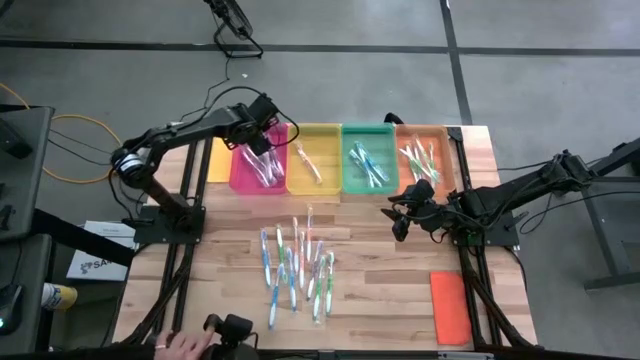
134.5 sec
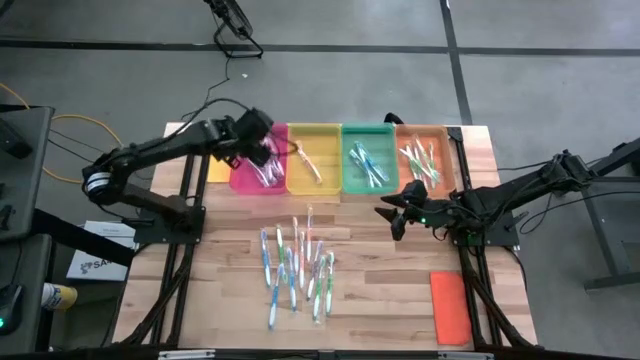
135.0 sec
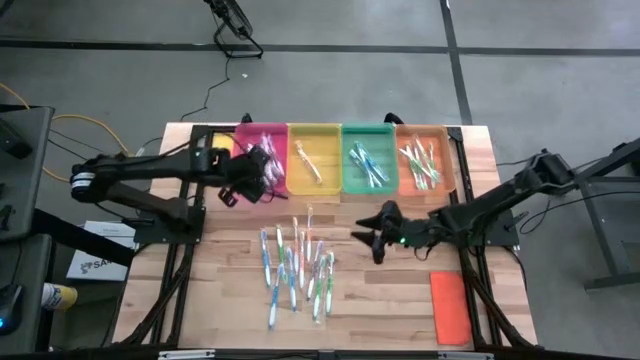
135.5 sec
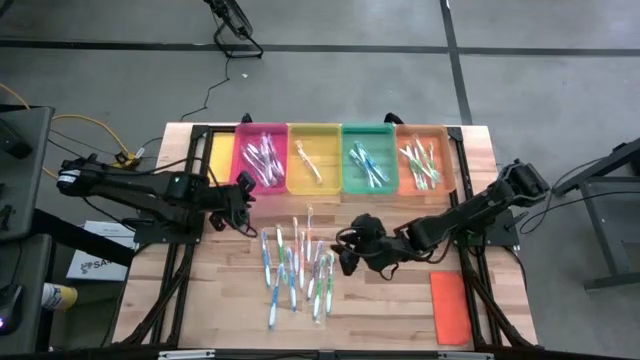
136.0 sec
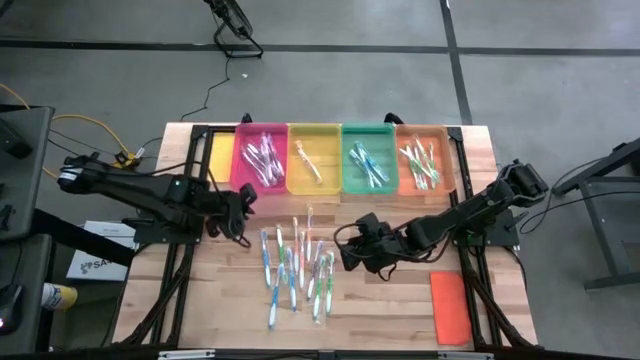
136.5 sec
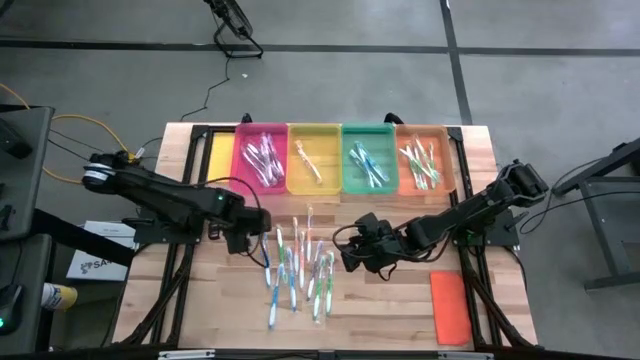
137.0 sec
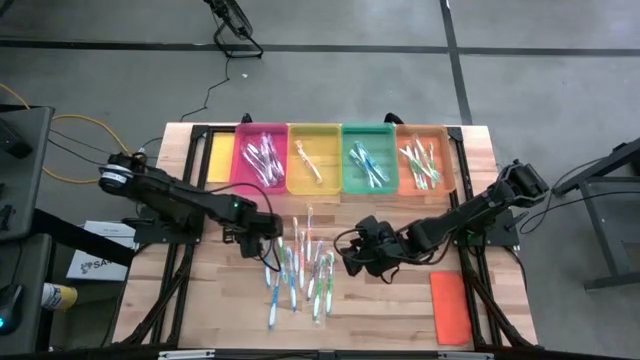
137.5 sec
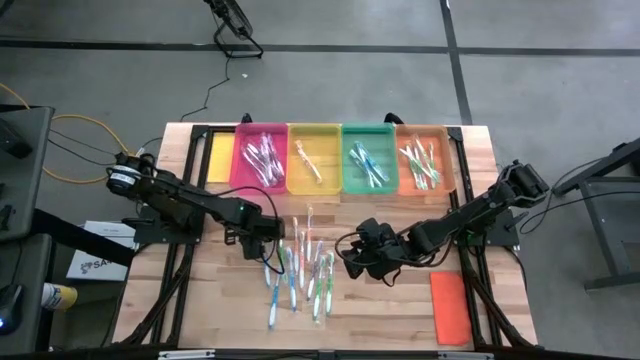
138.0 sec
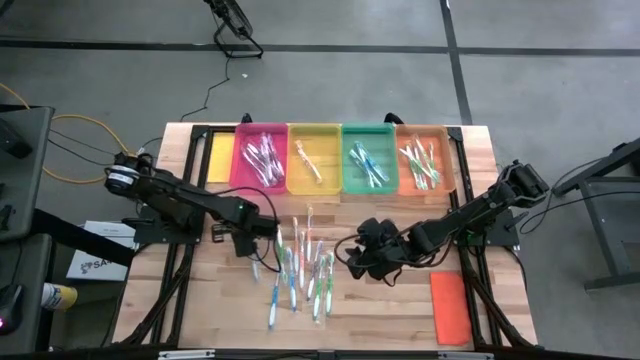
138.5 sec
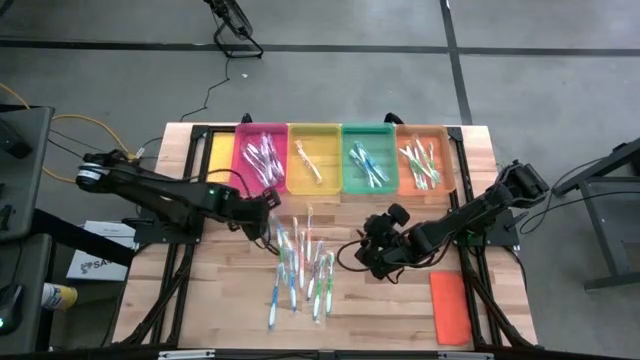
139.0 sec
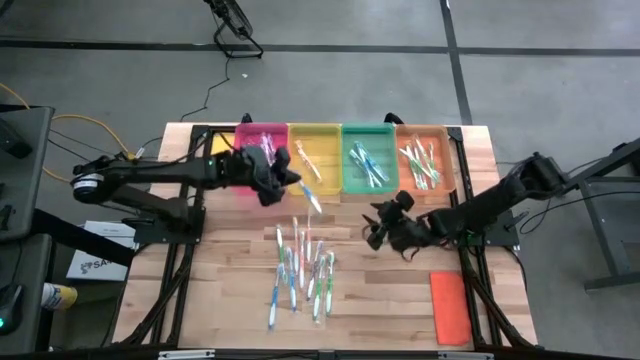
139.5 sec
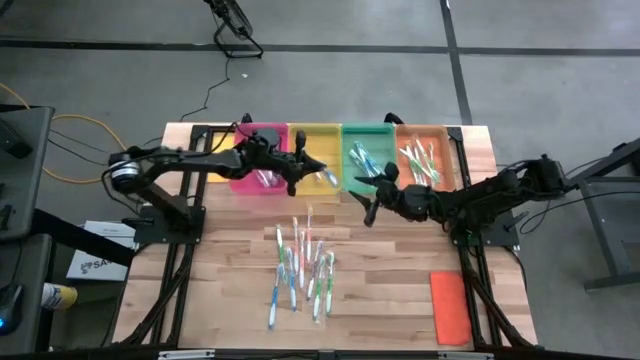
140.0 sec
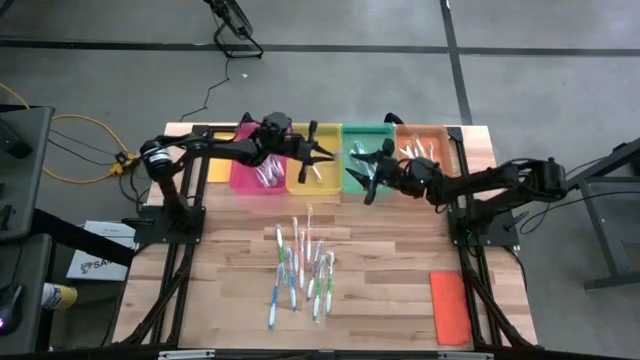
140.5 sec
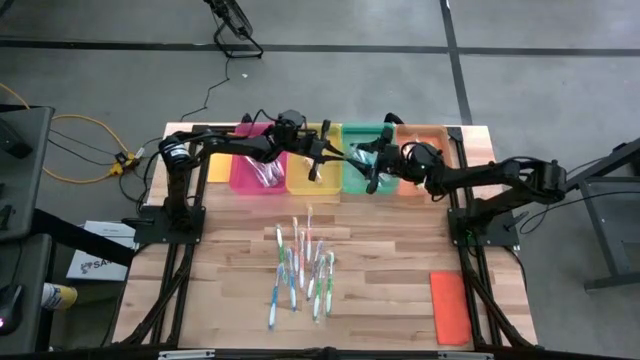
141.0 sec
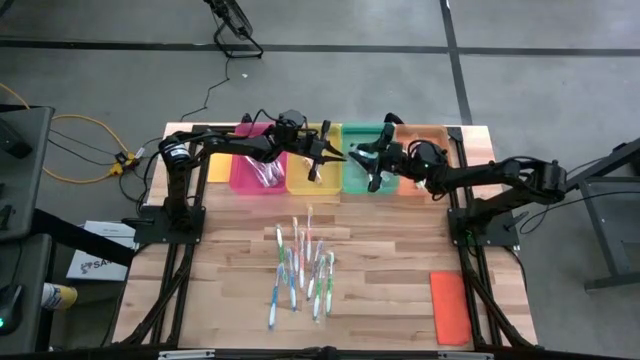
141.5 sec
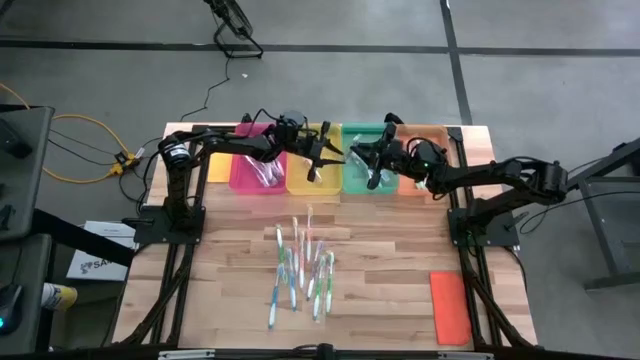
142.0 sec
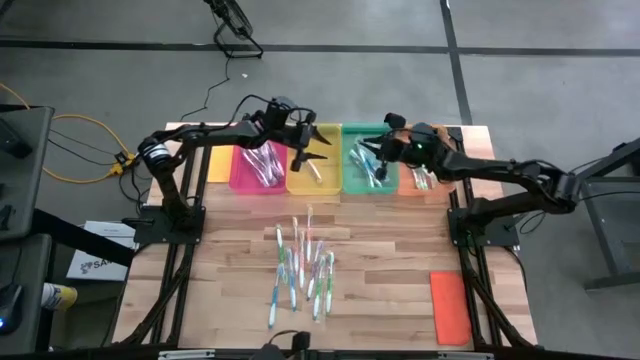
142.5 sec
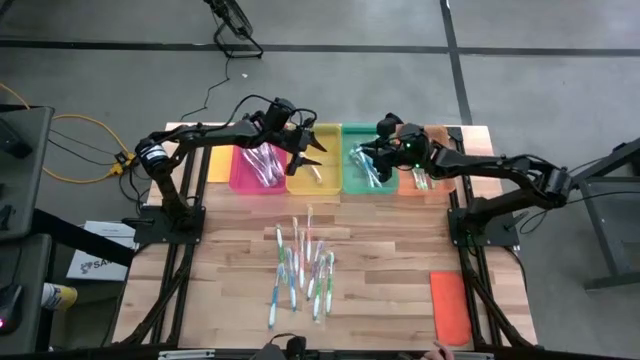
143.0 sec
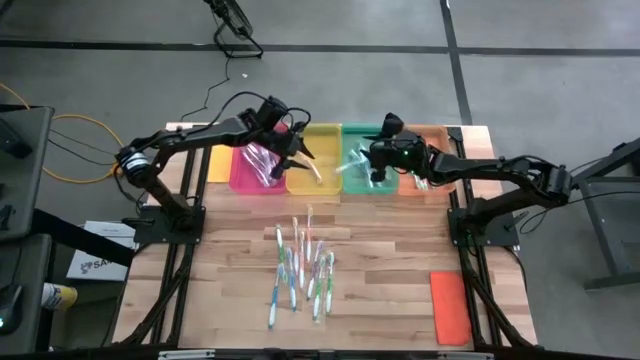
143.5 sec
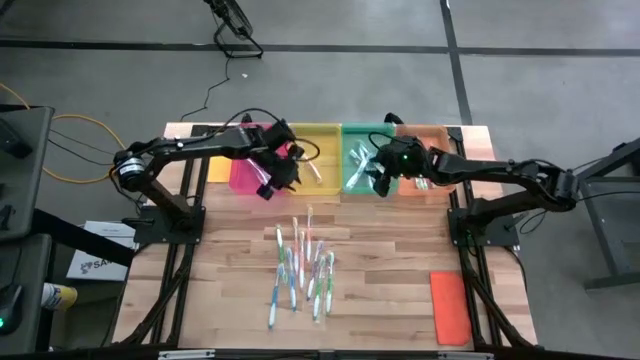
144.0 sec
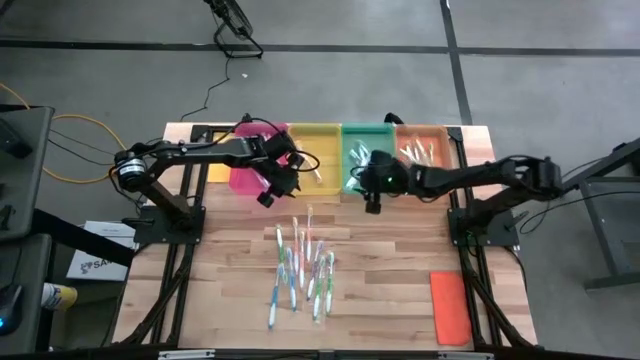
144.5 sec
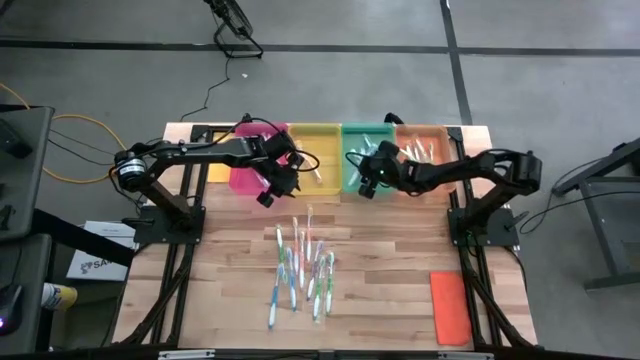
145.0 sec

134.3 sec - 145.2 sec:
Task: Pick & Place Toothbrushes
Put the blue toothbrush into the green bin

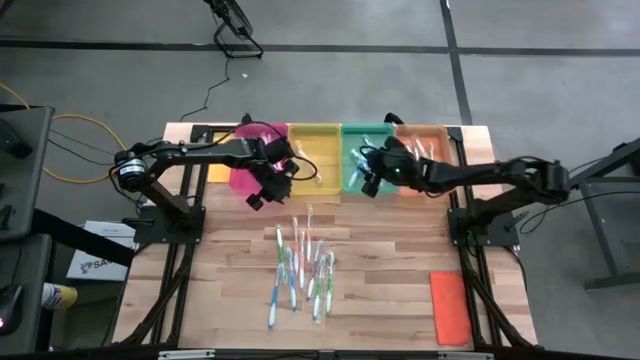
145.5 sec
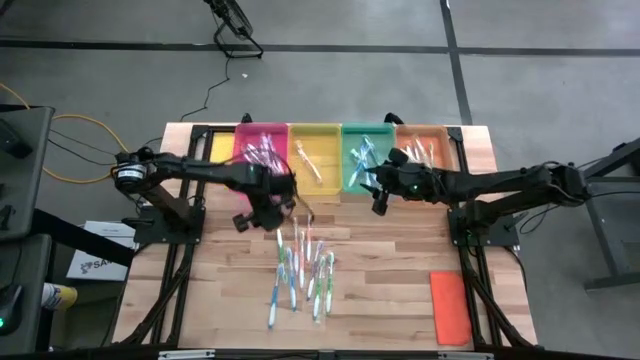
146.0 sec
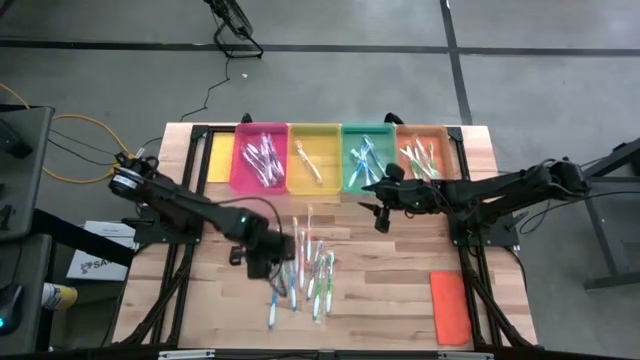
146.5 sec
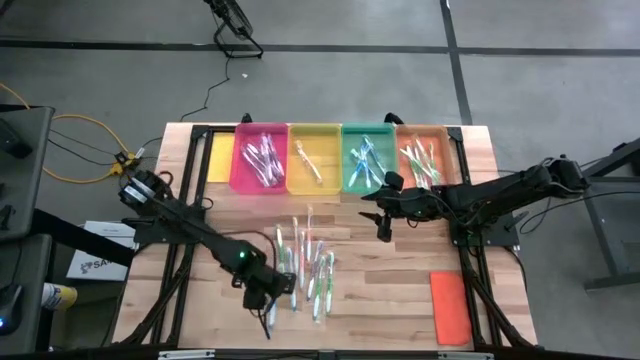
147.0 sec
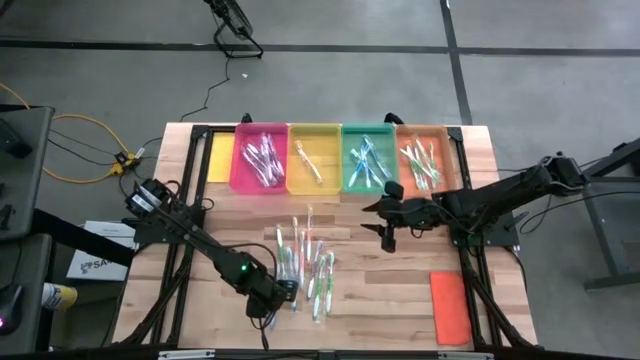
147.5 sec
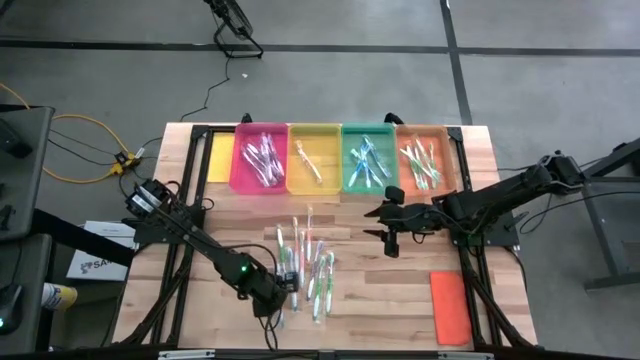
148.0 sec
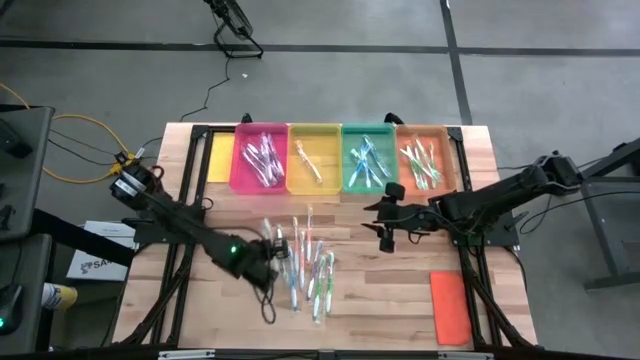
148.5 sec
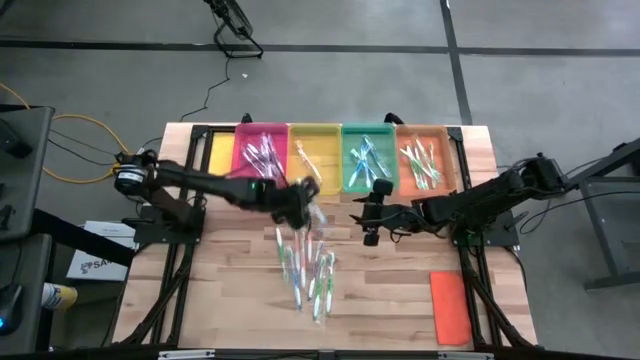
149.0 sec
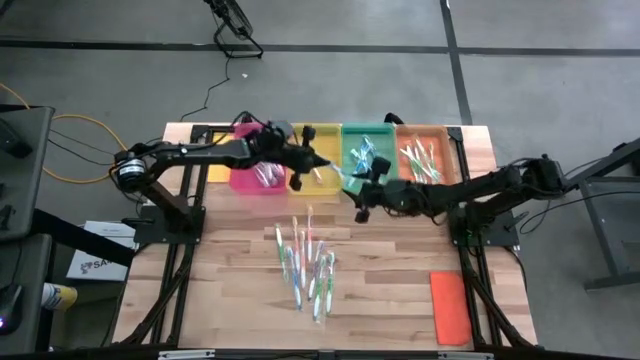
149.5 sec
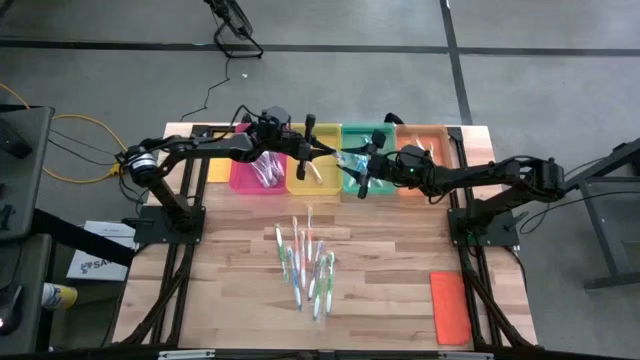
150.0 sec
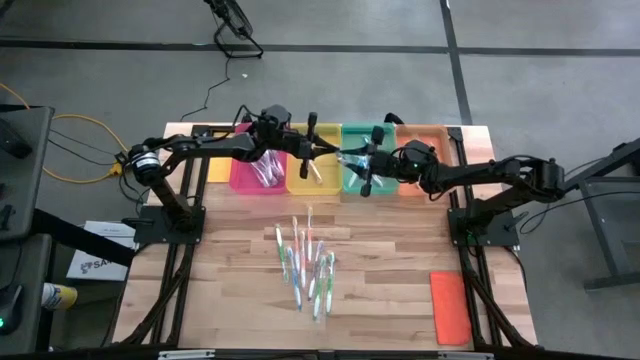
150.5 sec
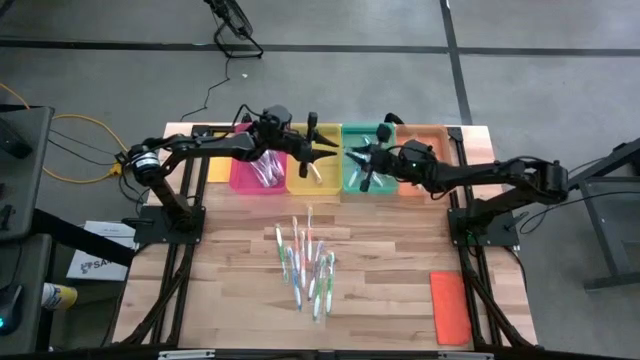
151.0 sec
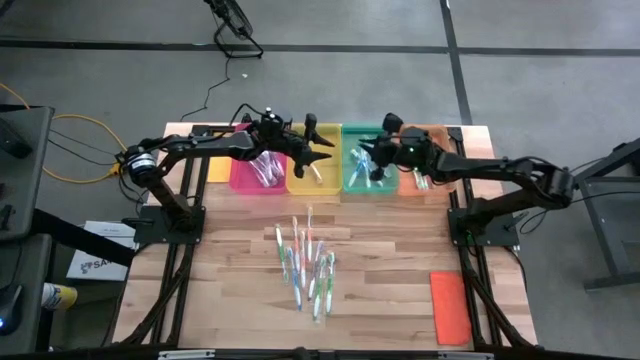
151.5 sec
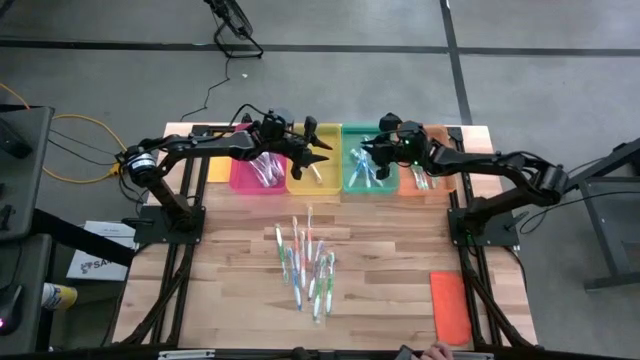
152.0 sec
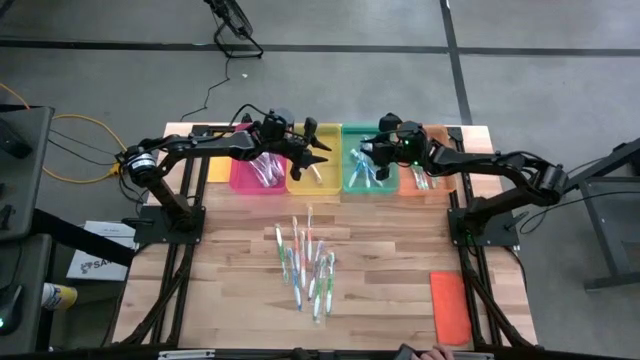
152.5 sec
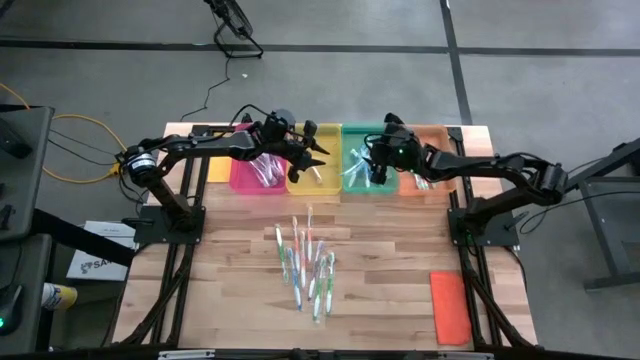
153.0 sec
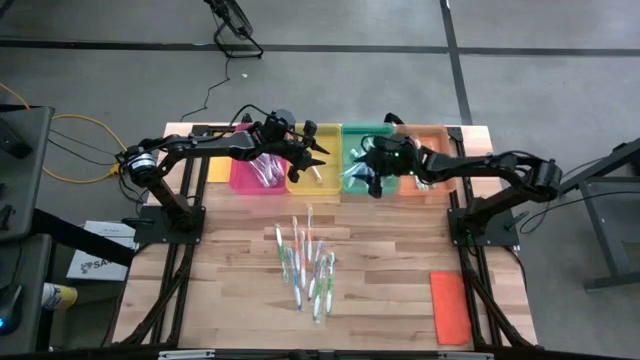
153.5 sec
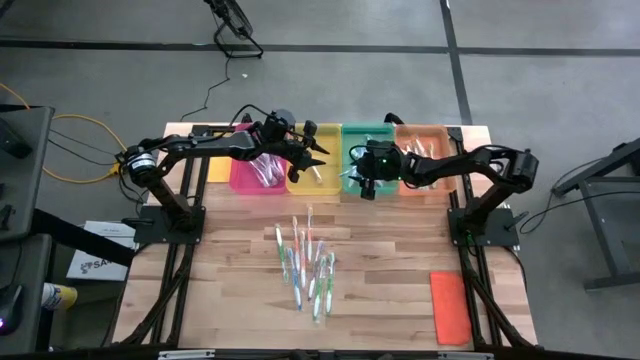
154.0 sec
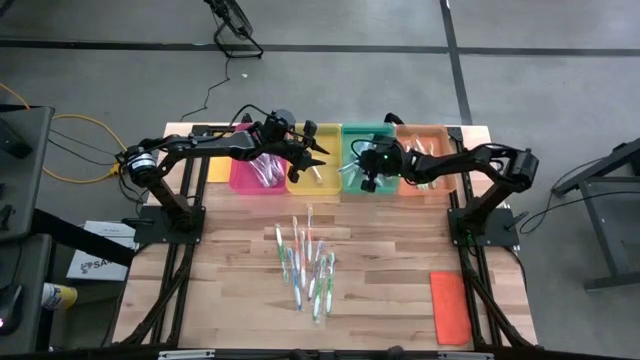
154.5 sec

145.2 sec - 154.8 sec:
Put the blue toothbrush into the green bin

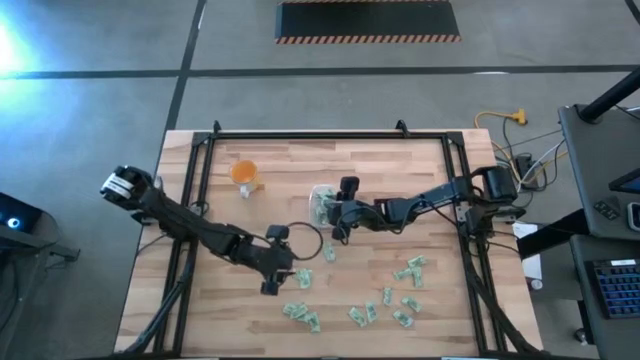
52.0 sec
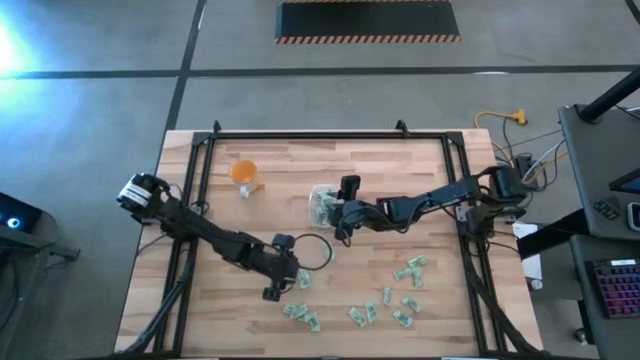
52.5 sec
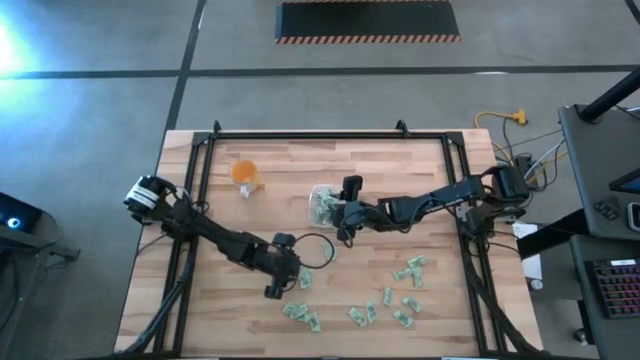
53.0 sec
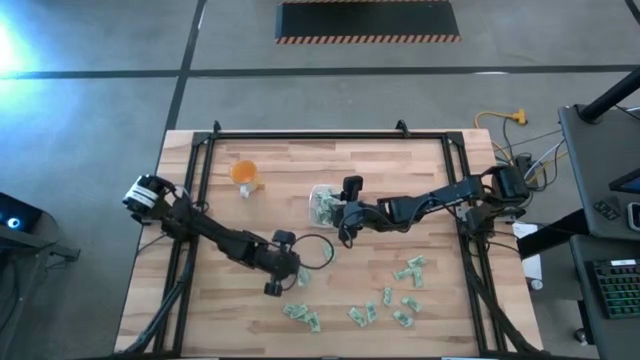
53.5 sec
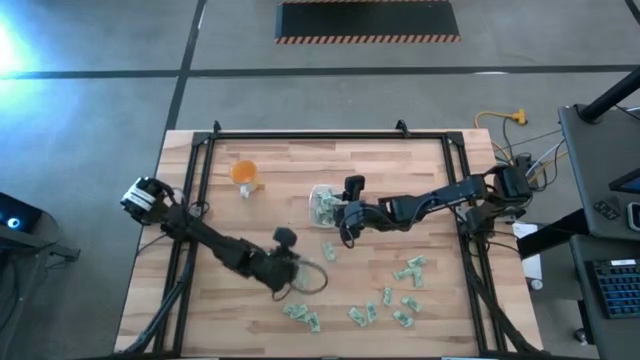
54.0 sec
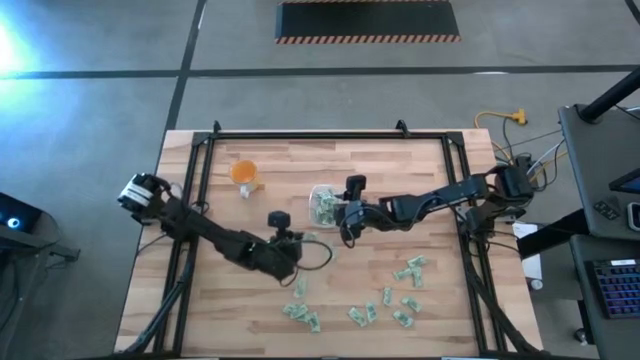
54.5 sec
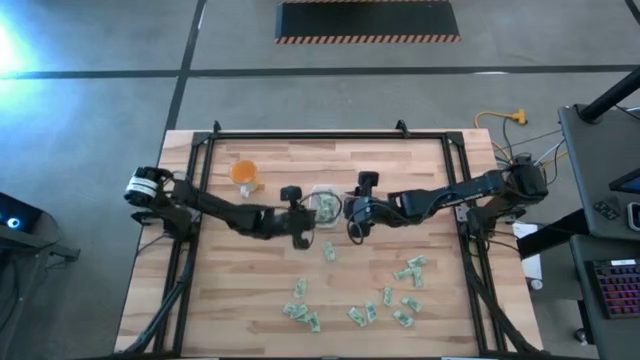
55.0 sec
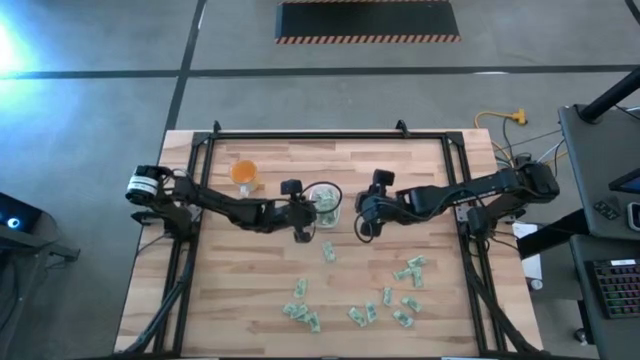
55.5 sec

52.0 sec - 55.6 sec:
Task: Pick and place Stevia / Truvia into bins
Put the stevia packet into the bin
